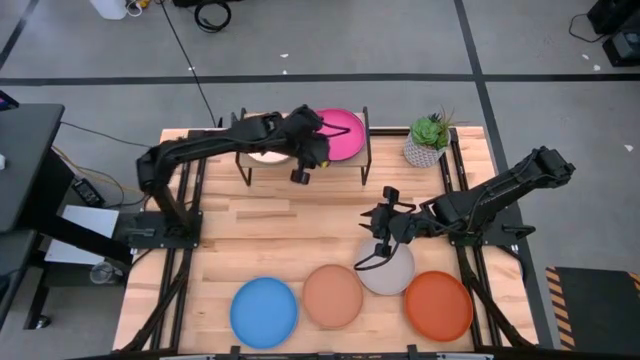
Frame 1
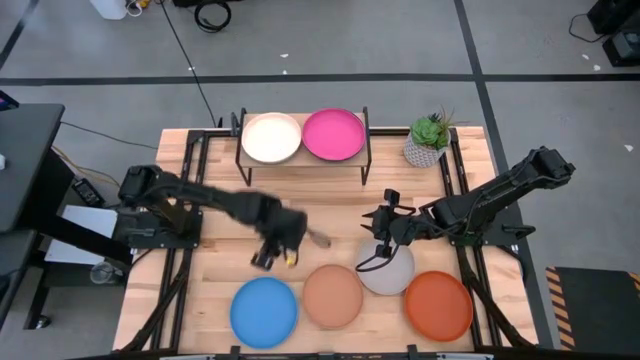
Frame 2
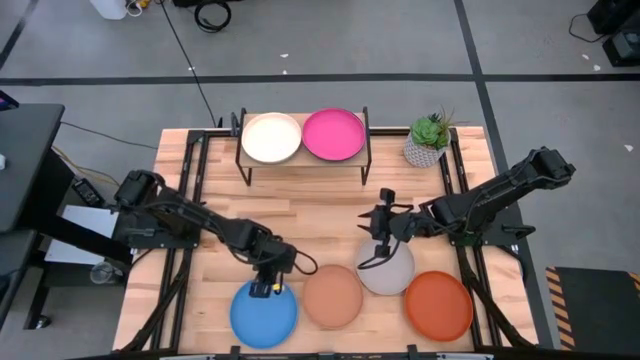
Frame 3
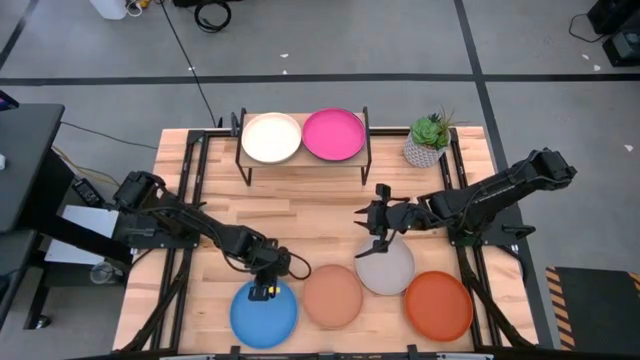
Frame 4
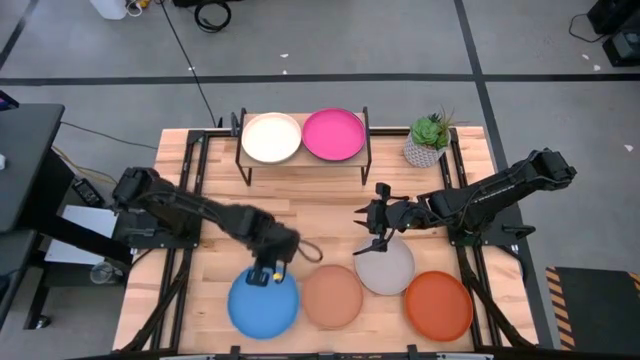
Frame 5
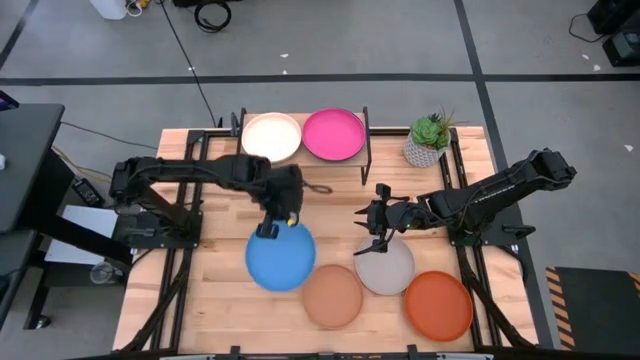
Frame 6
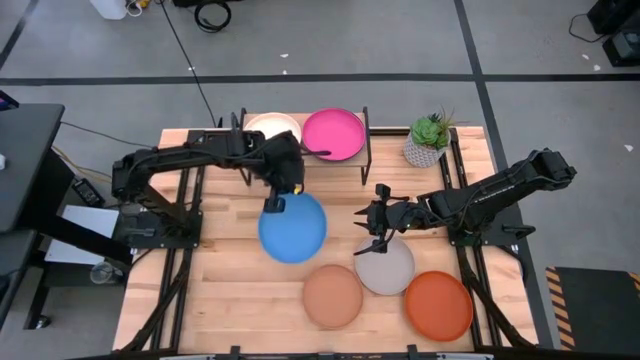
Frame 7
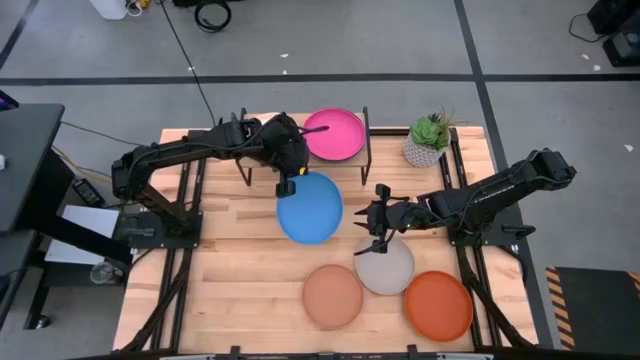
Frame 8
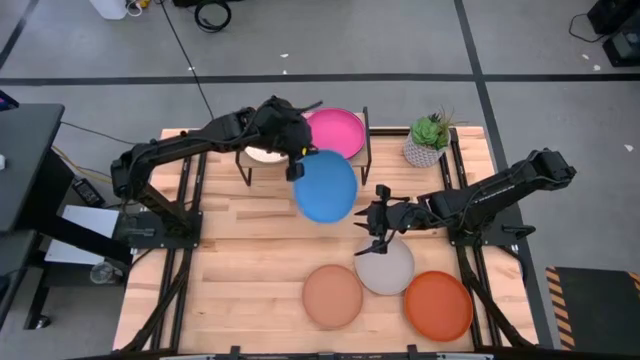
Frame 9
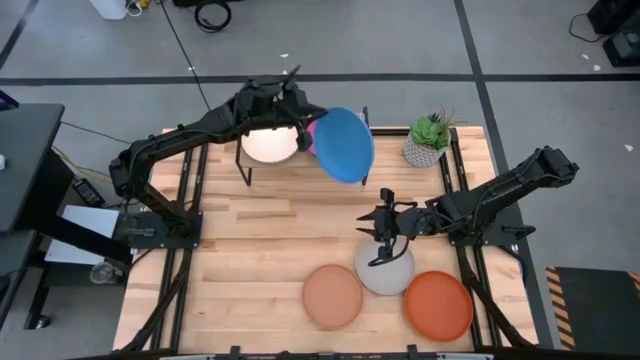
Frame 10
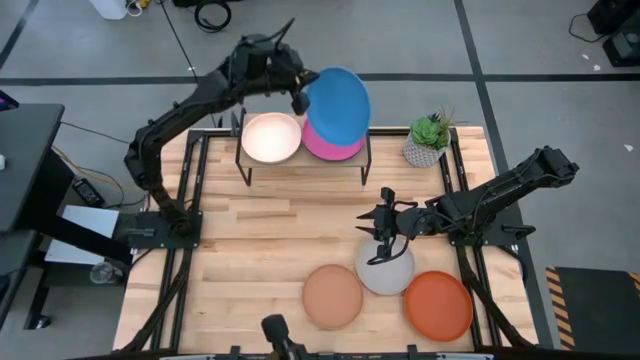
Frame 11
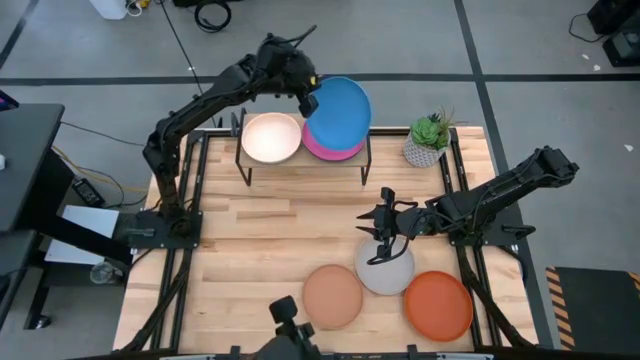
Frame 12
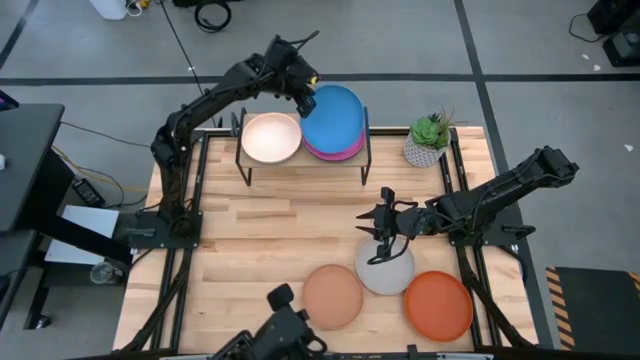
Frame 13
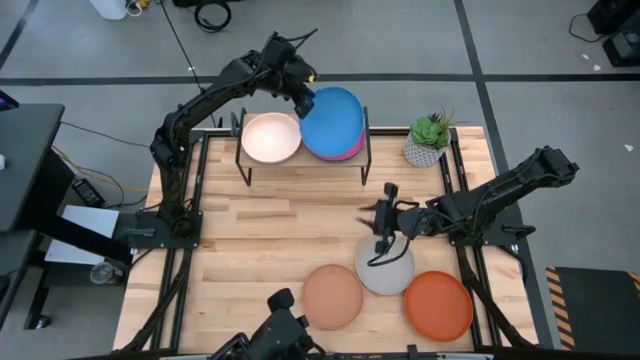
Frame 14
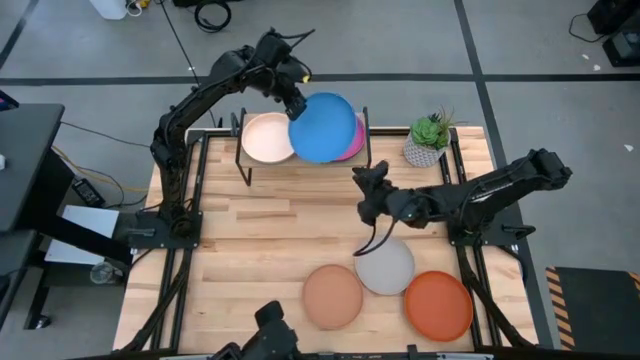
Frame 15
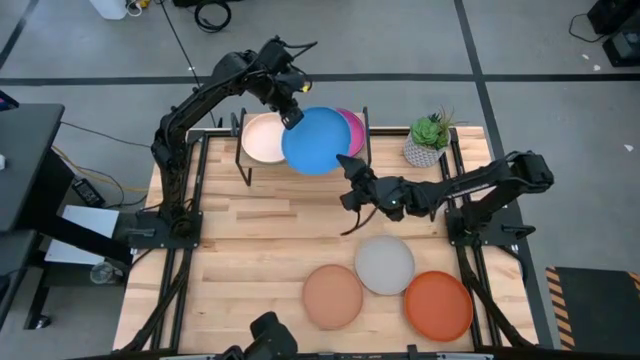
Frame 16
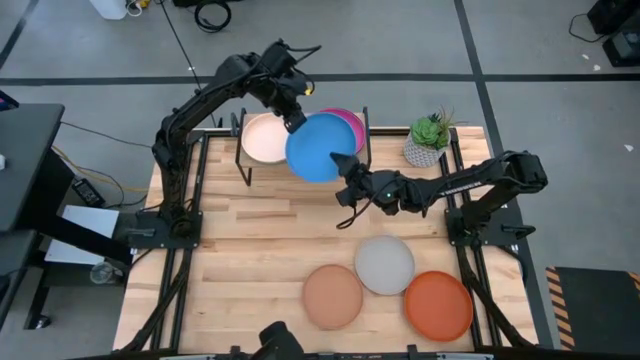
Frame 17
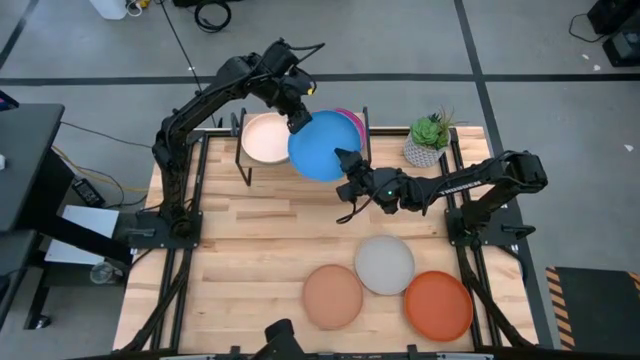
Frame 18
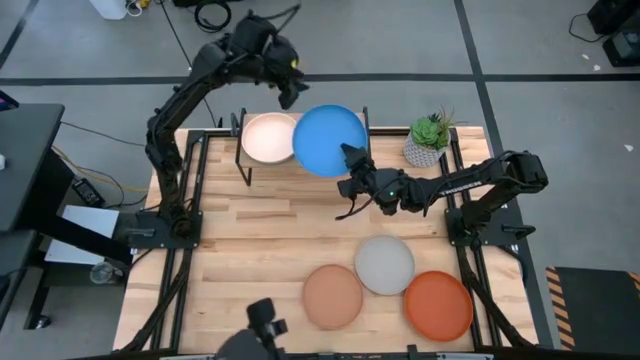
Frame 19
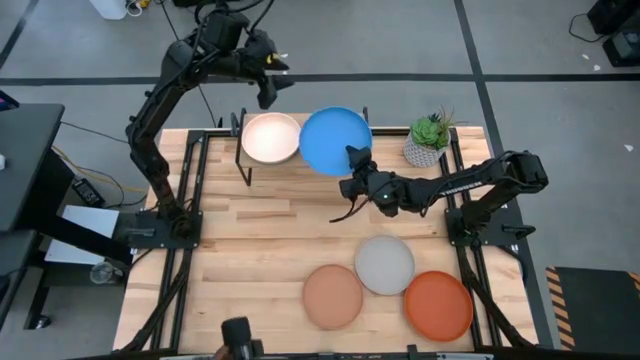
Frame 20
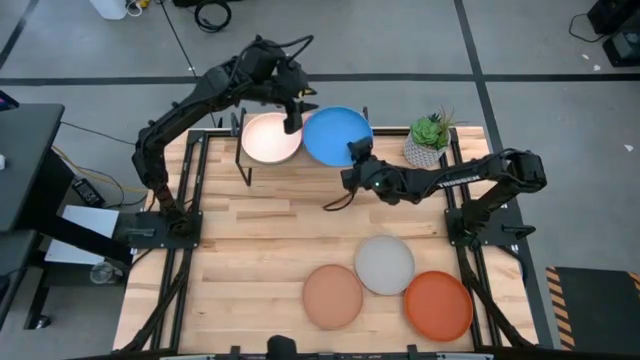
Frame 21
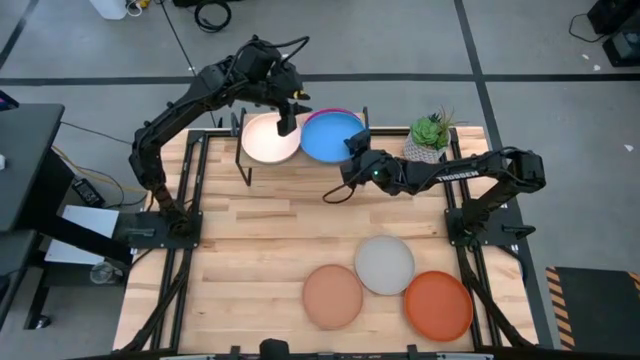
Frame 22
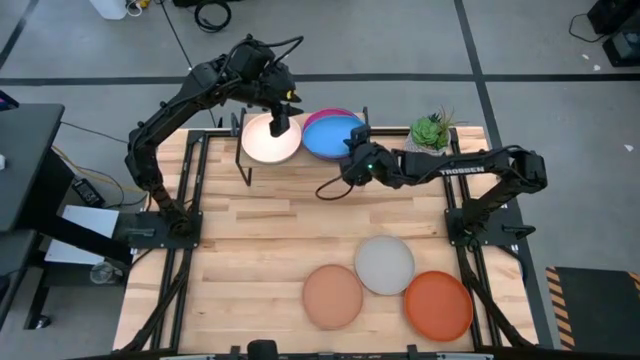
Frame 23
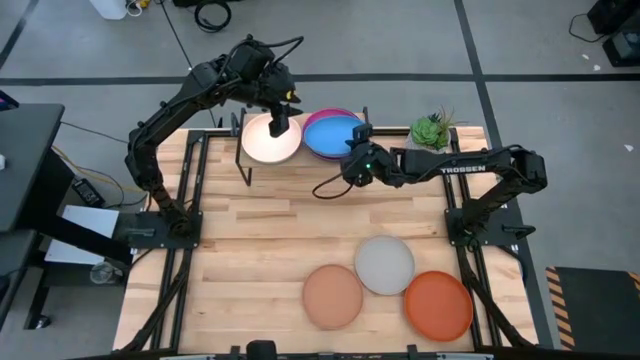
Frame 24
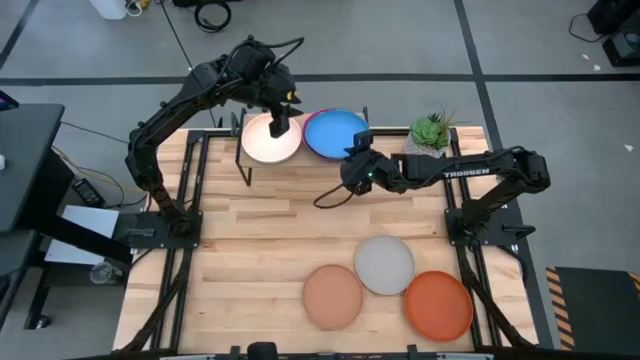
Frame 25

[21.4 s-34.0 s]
Task: Place and stack plates onto a shelf
Stack the blue plate on top of the pink plate on the shelf

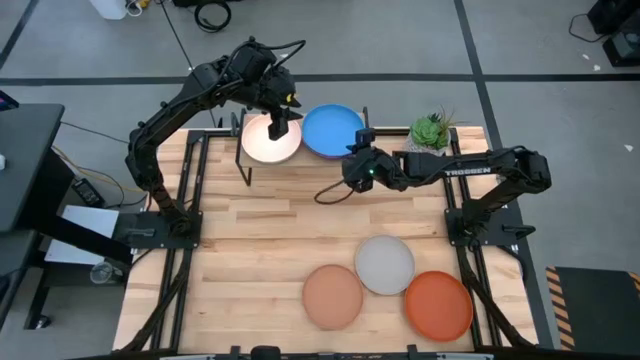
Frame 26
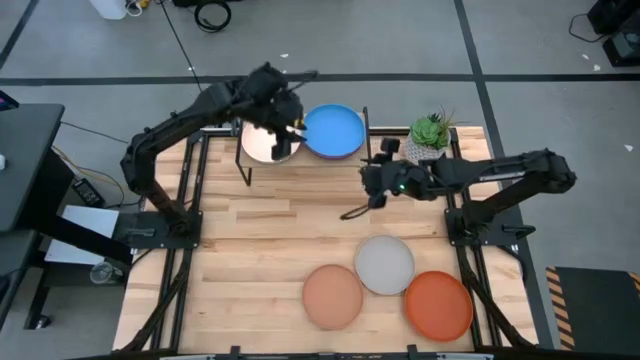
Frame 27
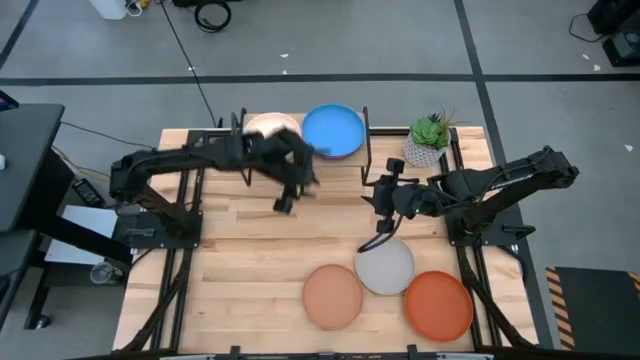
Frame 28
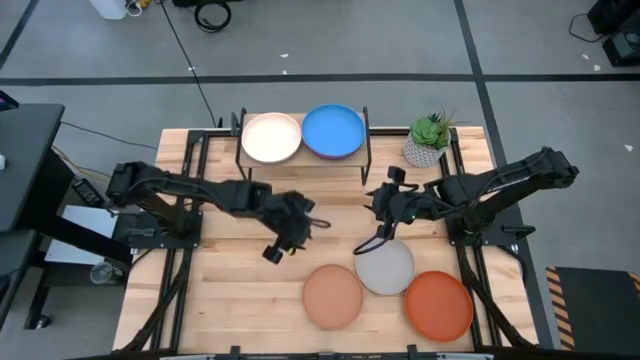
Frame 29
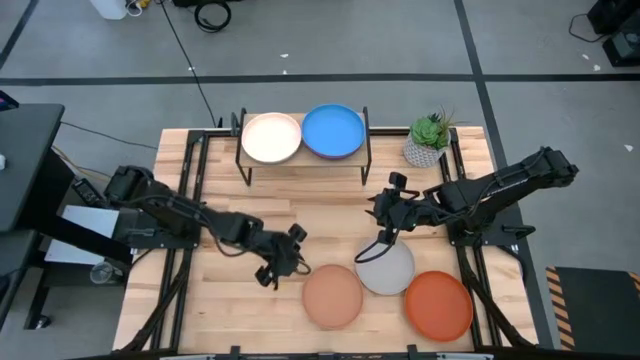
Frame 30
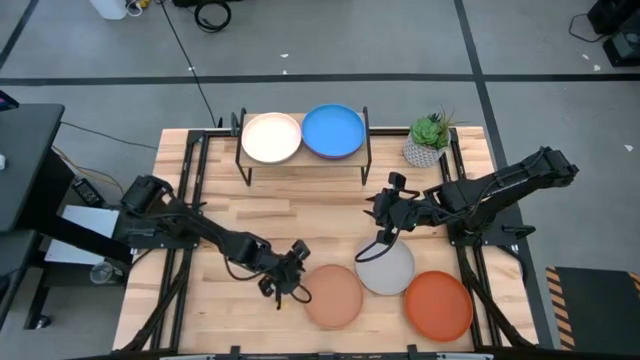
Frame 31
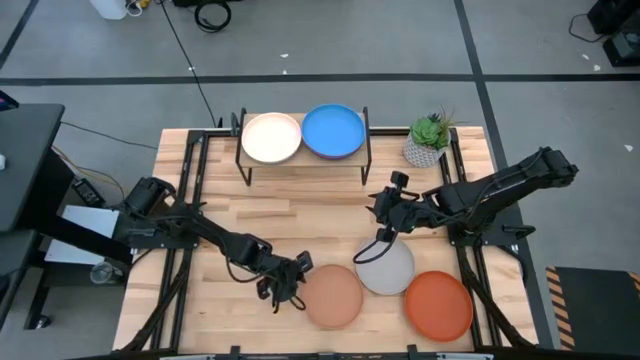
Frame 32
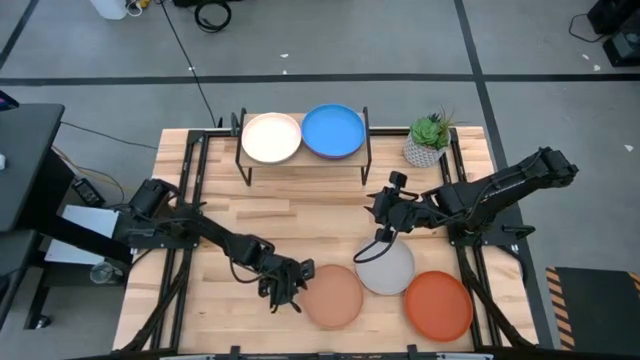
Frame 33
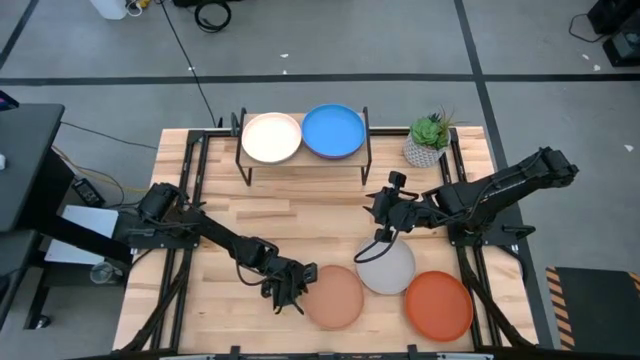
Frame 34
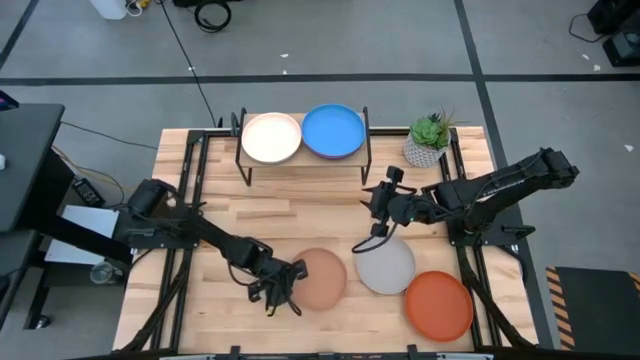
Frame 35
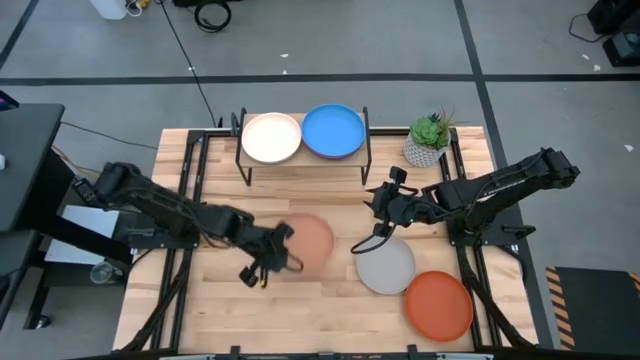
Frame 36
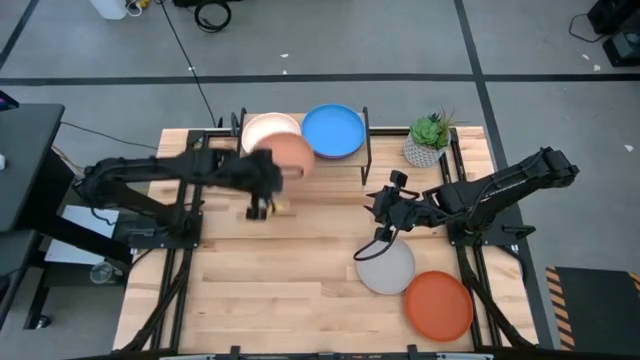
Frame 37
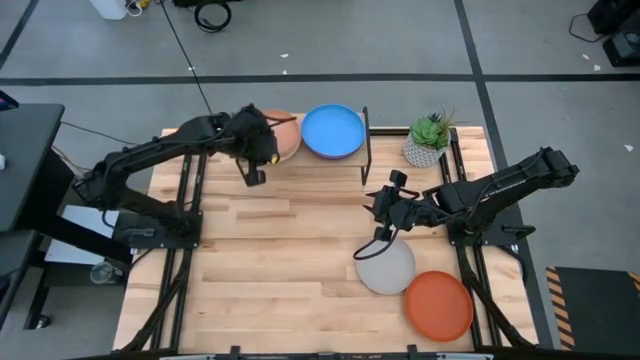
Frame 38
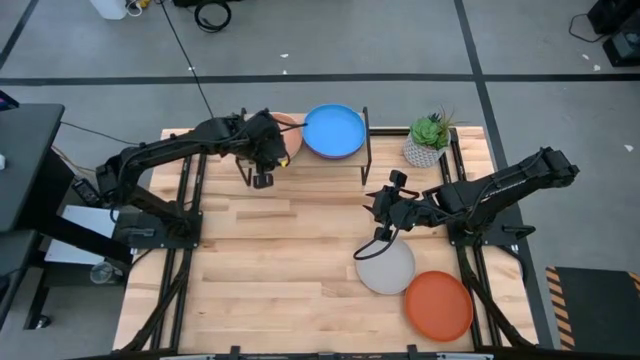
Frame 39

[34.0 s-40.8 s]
Stack the brown plate on top of the light orange plate on the shelf
